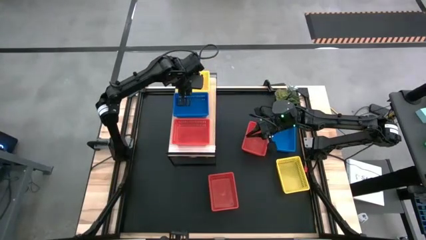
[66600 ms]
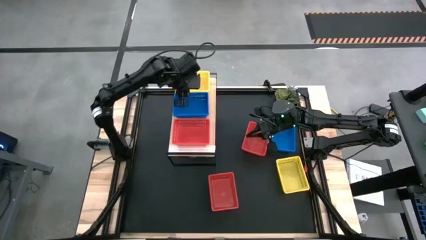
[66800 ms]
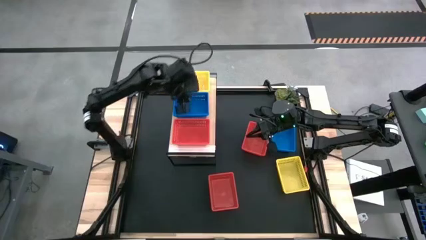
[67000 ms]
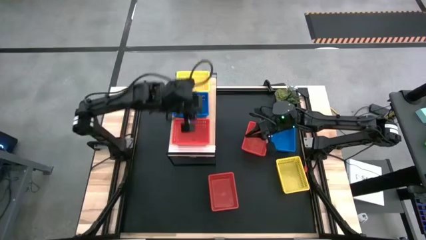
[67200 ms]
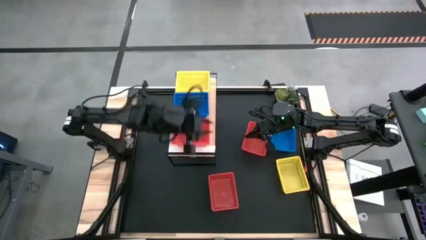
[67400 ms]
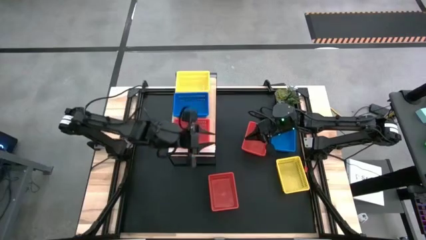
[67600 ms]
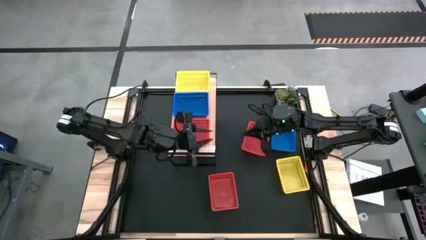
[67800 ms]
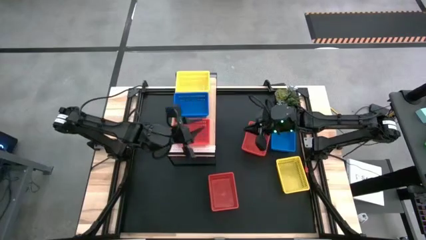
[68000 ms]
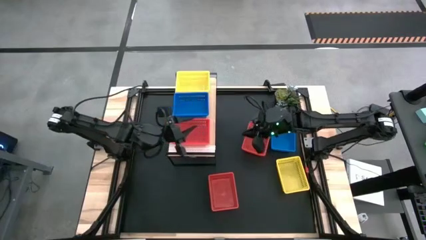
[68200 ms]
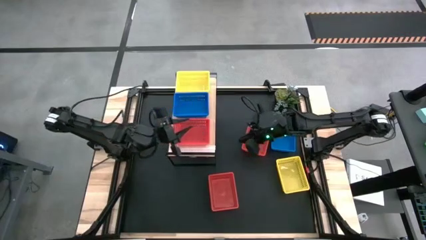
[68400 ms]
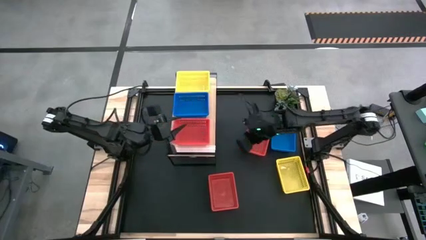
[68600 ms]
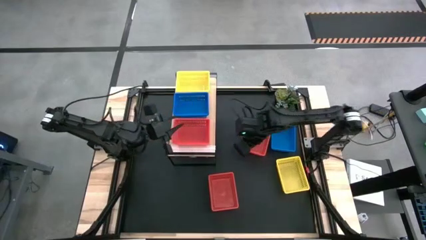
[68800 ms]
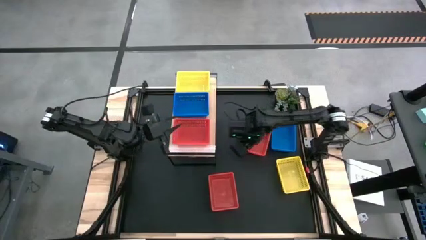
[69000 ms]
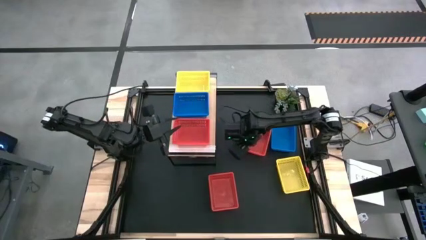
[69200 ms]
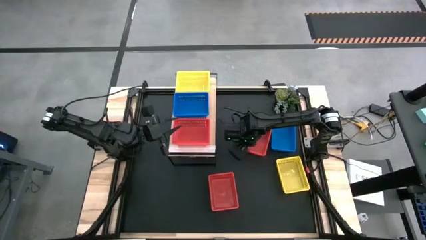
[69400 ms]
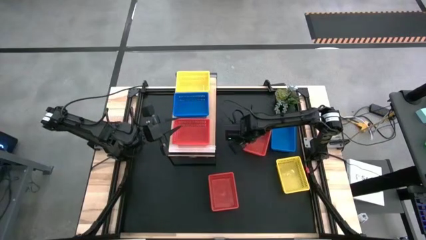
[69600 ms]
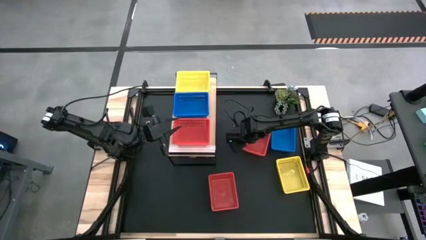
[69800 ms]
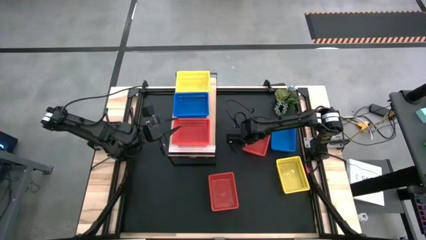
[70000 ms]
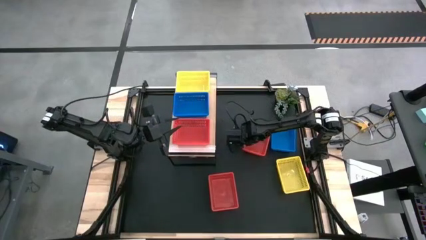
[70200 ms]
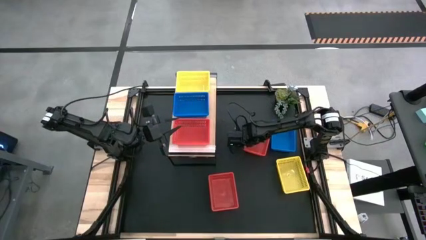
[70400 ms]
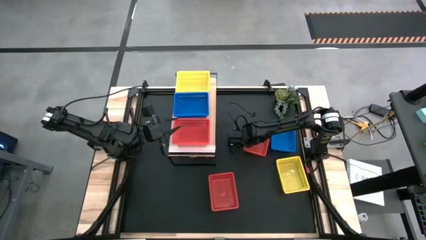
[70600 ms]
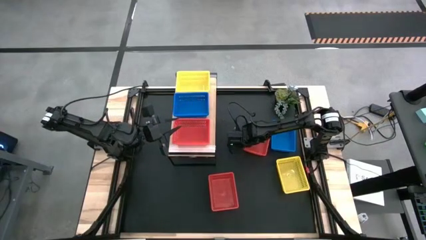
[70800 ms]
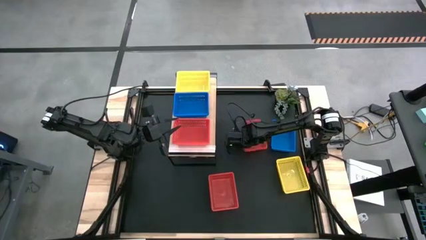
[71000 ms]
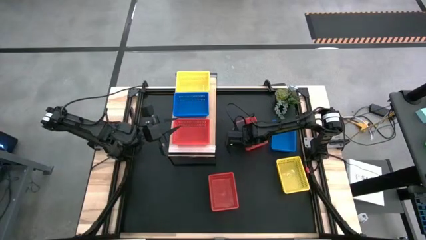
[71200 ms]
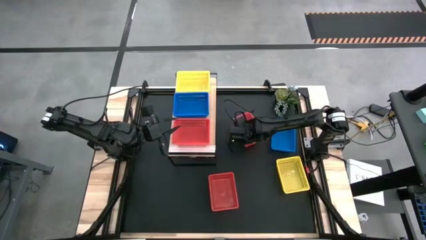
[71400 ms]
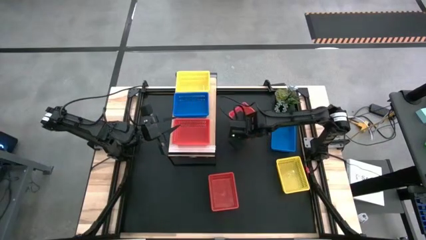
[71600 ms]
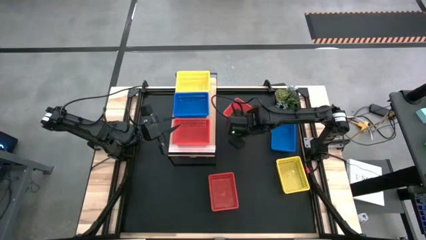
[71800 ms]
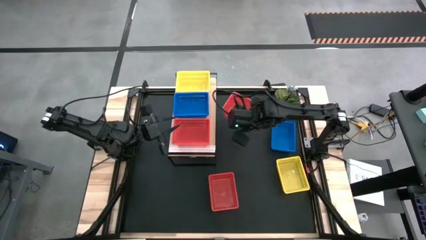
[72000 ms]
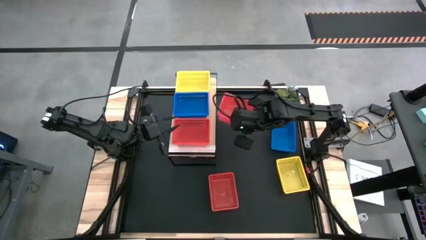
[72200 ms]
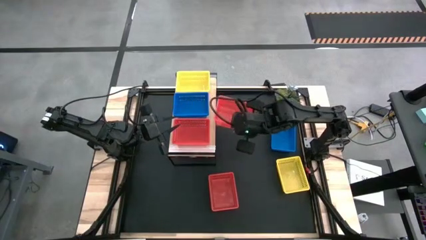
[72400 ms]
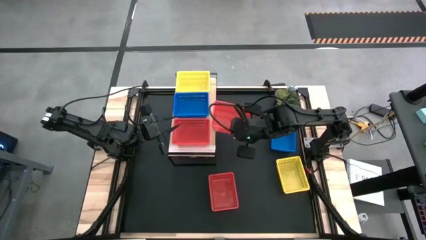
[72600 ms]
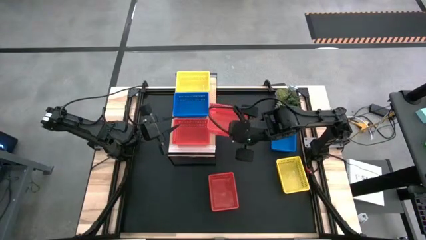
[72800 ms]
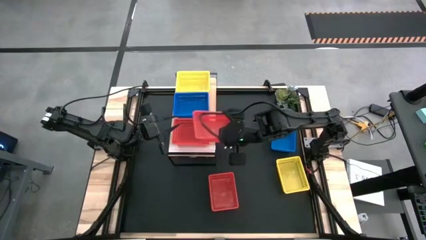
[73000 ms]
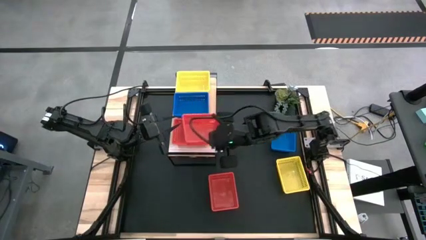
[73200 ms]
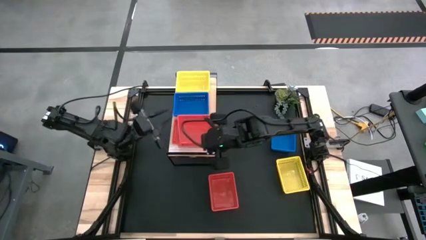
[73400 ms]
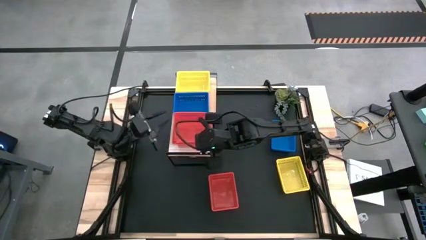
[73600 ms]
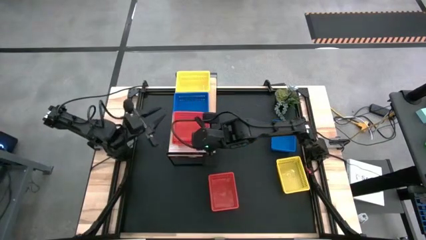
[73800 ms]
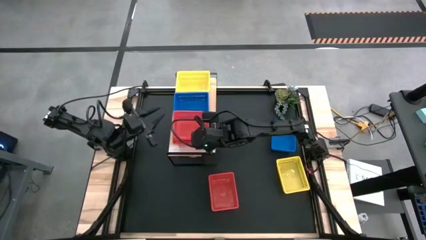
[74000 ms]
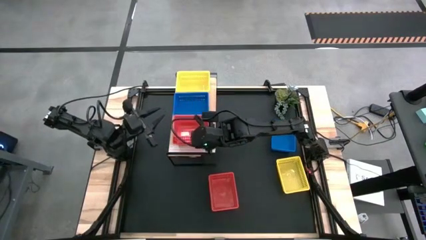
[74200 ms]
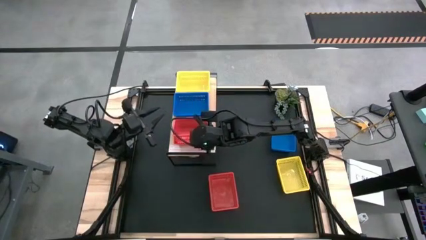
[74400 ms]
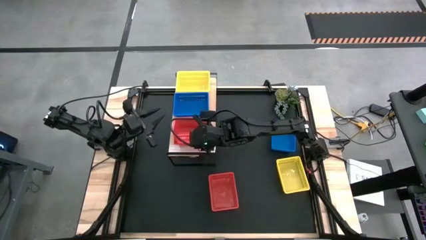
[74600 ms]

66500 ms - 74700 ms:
Task: Stack baskets on shelf by color
Stack the top red bin on top of the red bin on the shelf

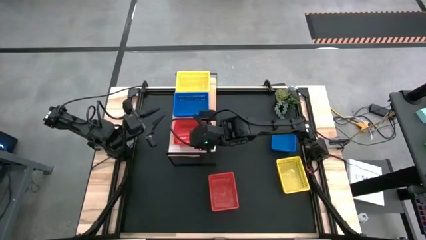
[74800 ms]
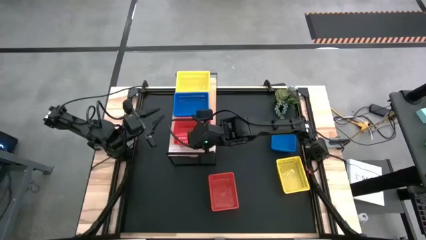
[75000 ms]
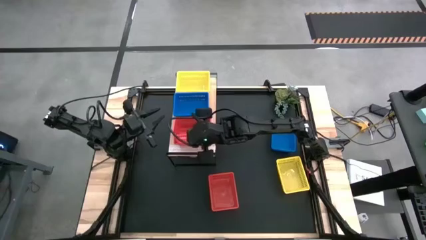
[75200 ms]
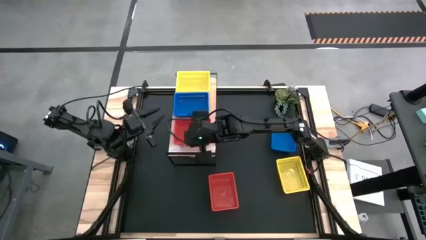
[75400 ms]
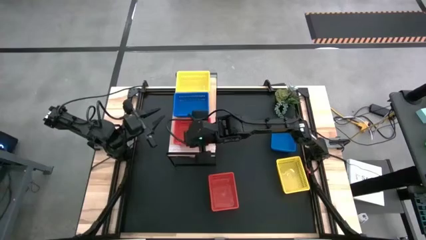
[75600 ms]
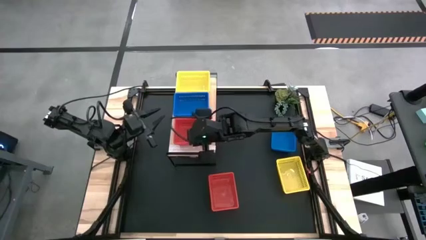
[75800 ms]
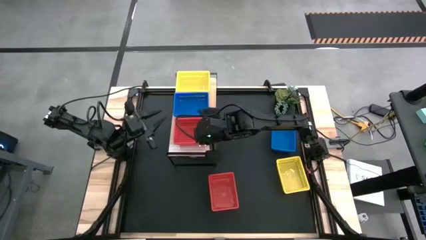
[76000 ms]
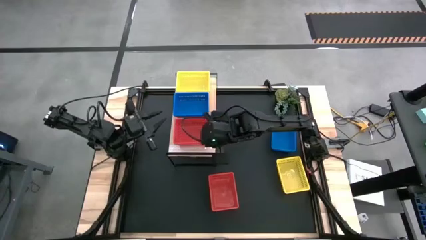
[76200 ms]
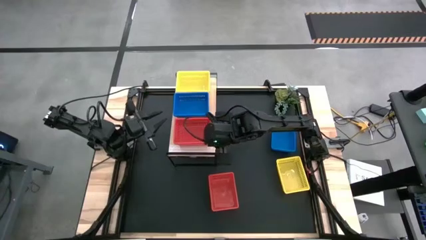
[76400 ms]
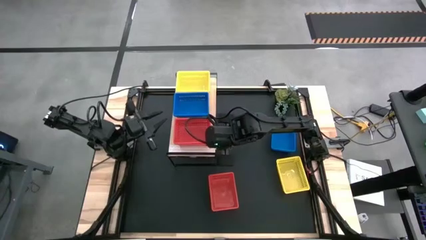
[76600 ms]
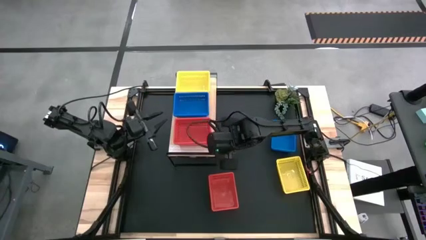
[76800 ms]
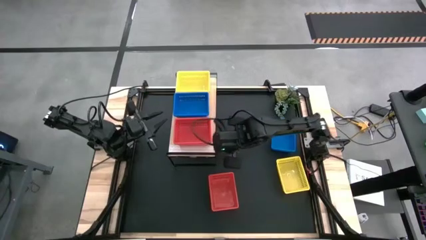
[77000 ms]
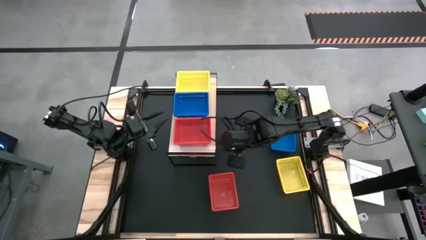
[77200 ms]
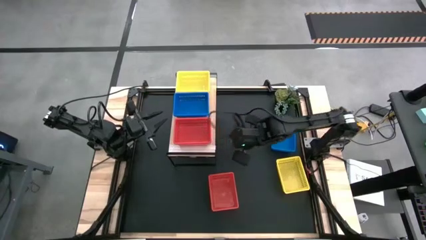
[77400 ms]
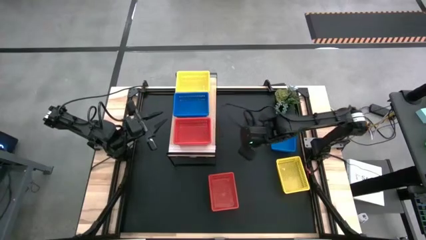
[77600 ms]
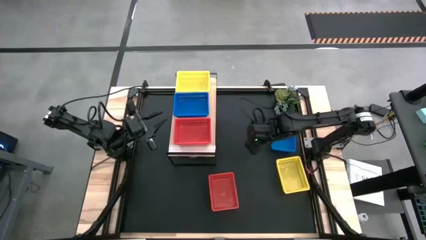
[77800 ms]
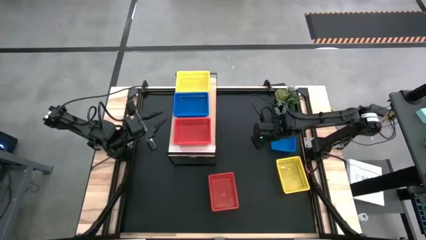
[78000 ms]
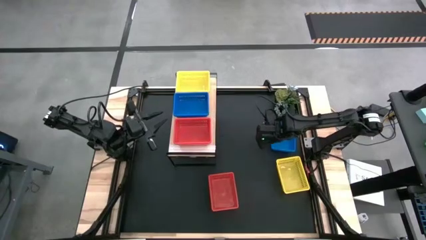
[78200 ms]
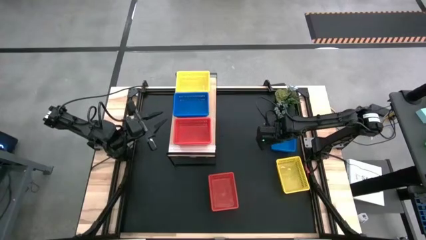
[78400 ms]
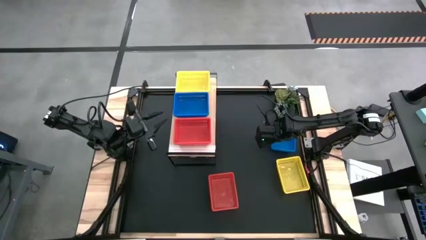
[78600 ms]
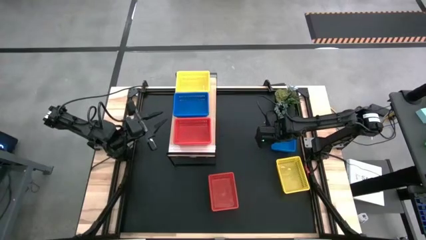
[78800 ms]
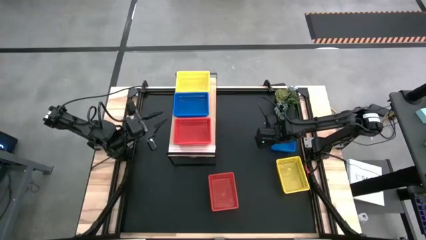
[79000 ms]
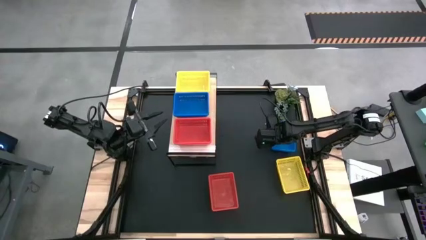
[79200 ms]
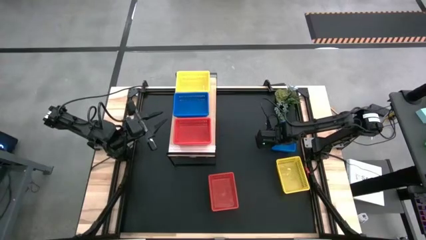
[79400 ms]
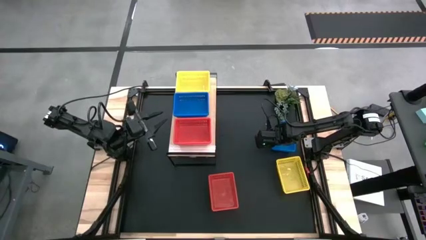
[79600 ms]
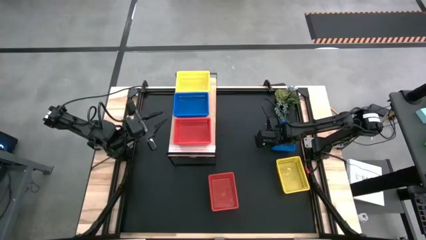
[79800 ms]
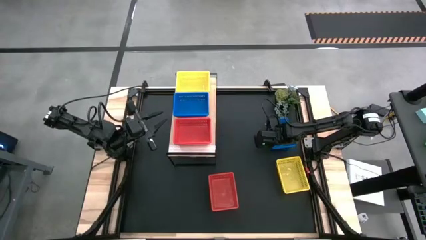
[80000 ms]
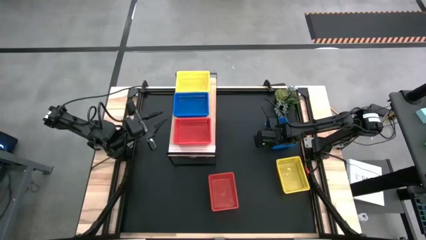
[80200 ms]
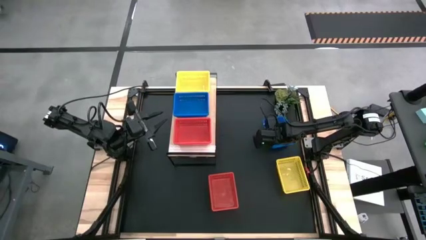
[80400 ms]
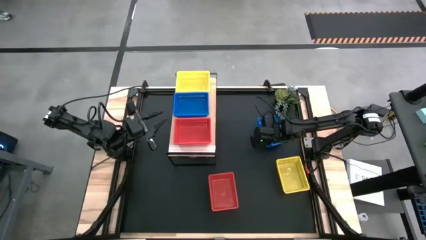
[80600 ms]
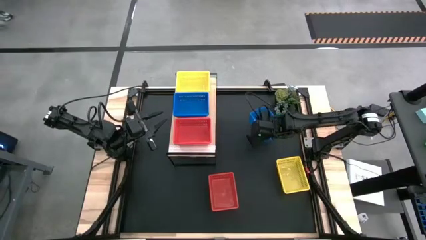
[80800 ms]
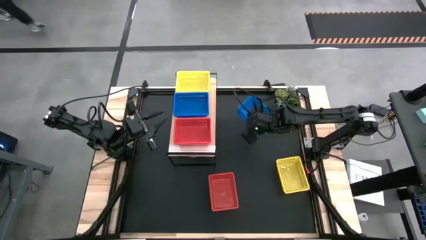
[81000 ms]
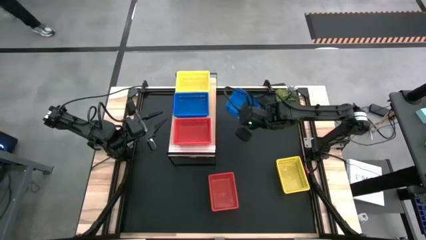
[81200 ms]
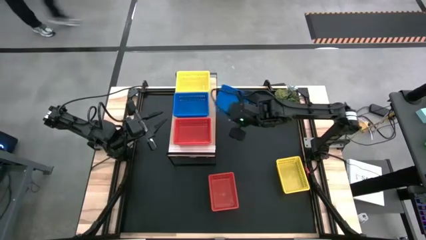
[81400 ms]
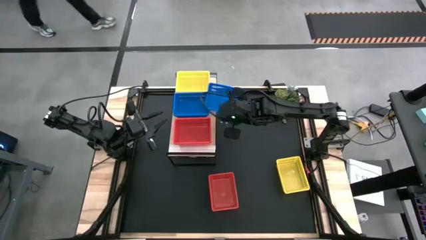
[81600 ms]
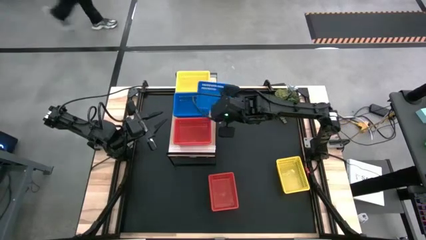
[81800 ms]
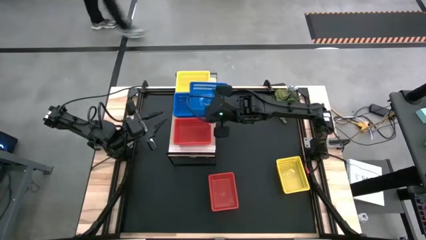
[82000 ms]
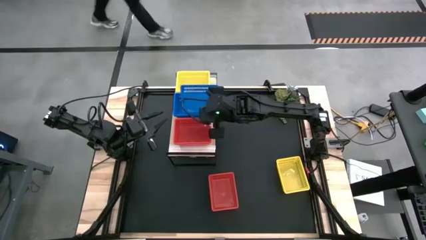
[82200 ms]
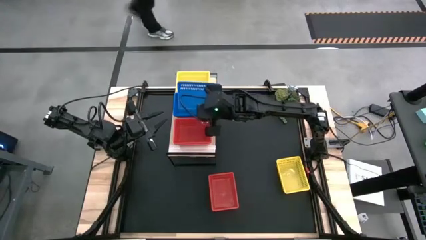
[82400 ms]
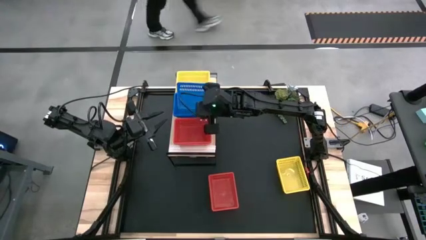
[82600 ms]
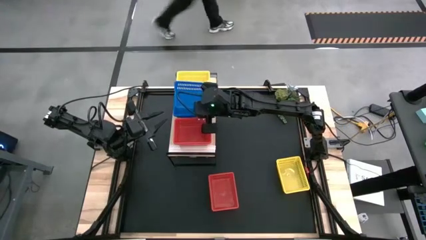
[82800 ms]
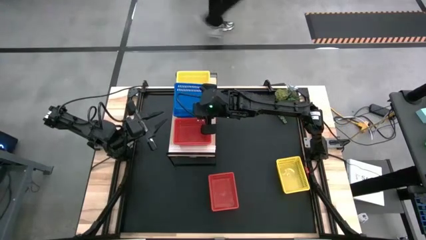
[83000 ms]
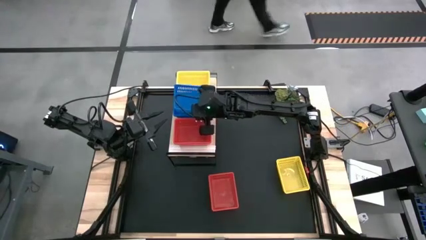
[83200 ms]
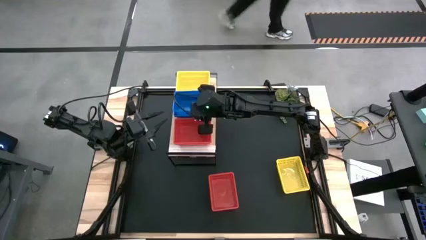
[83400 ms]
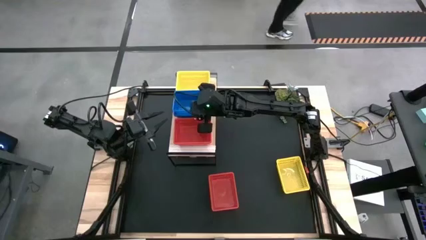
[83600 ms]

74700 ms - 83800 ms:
Stack the blue bin on top of the blue bins on the shelf
